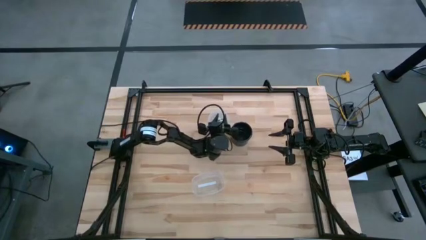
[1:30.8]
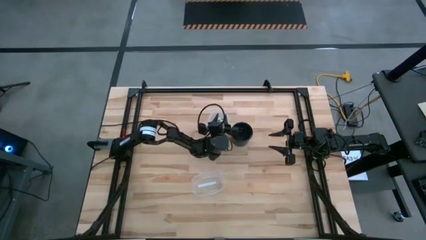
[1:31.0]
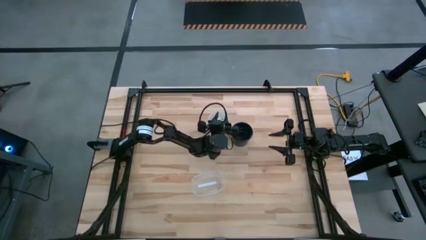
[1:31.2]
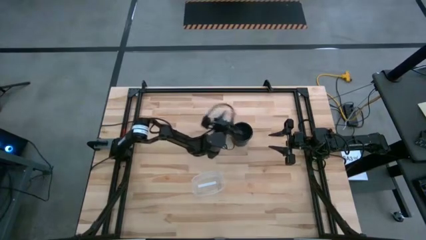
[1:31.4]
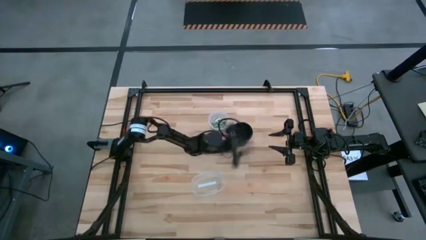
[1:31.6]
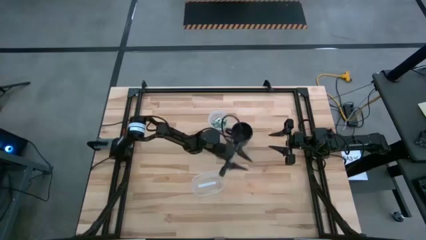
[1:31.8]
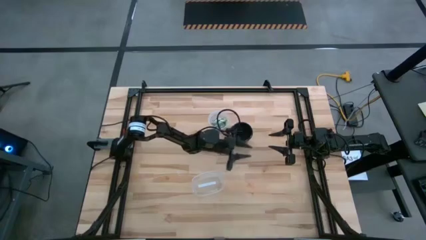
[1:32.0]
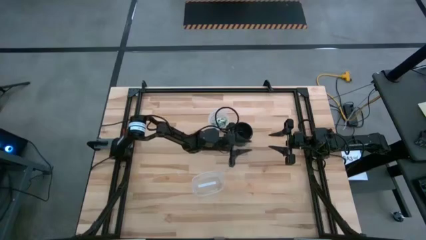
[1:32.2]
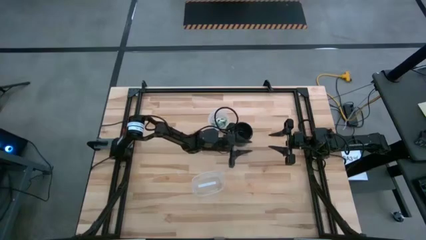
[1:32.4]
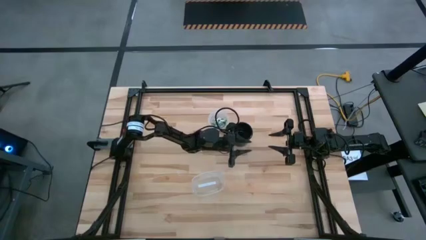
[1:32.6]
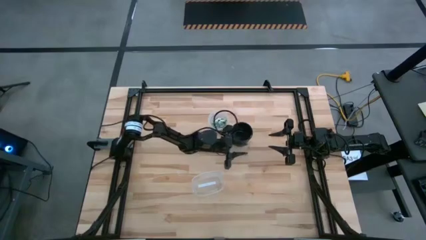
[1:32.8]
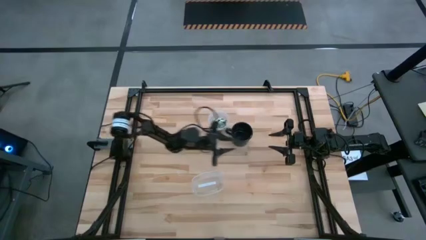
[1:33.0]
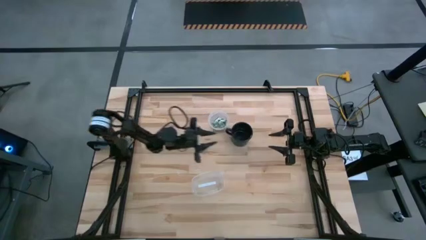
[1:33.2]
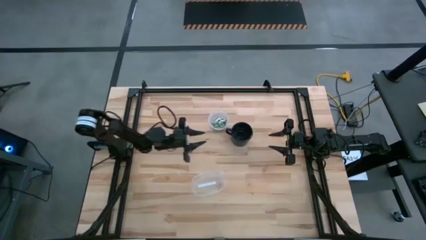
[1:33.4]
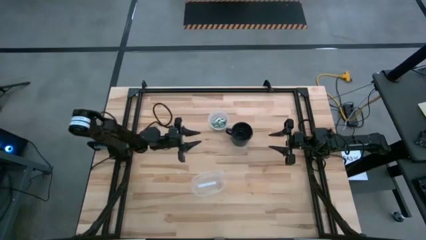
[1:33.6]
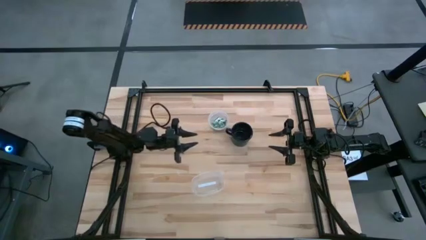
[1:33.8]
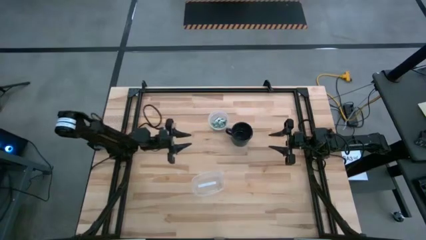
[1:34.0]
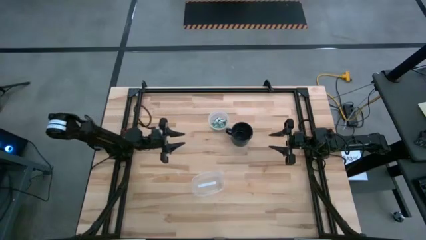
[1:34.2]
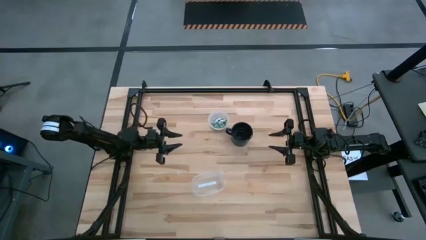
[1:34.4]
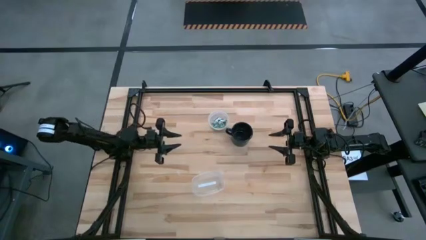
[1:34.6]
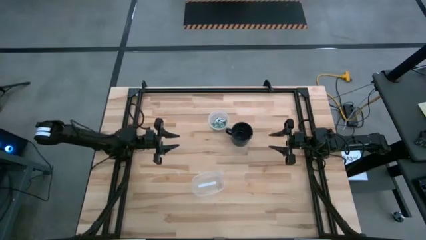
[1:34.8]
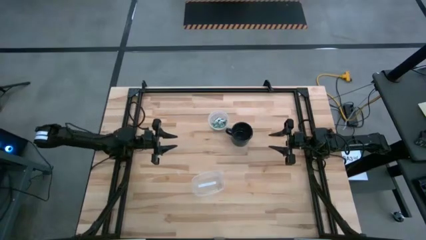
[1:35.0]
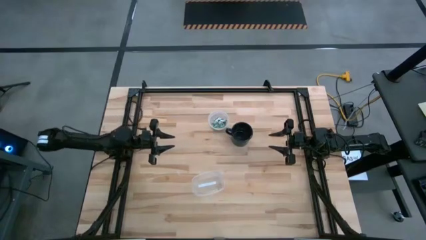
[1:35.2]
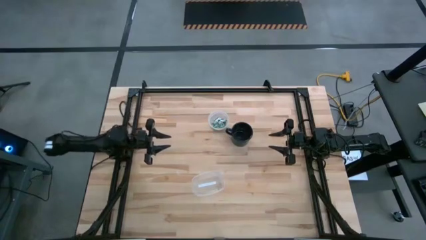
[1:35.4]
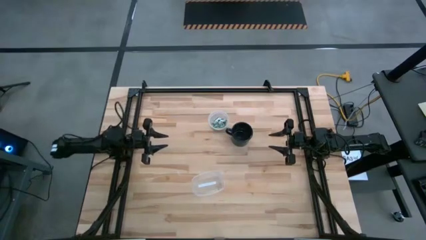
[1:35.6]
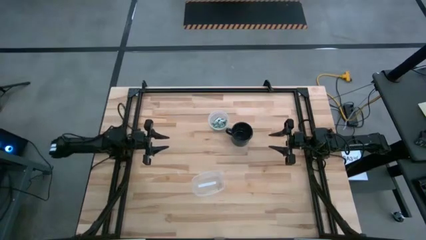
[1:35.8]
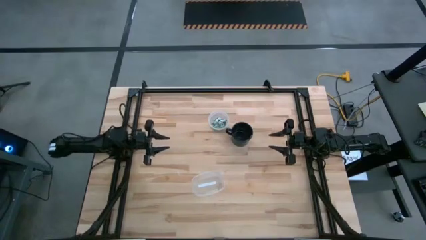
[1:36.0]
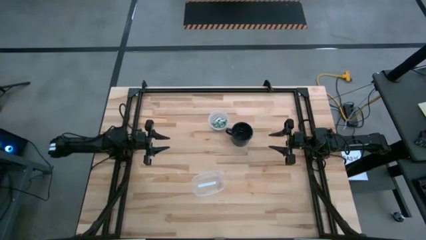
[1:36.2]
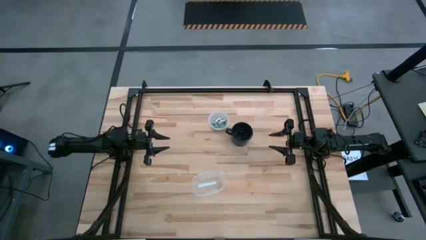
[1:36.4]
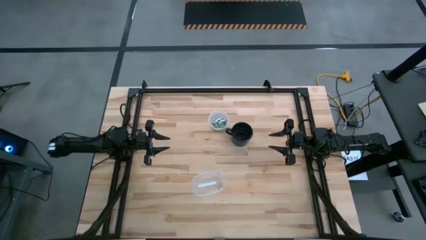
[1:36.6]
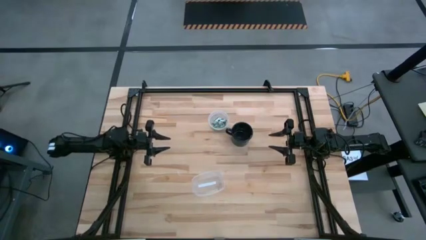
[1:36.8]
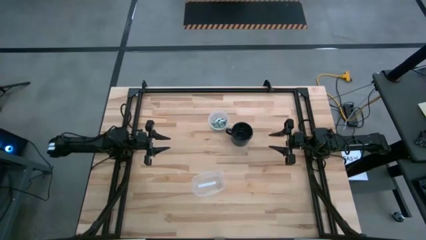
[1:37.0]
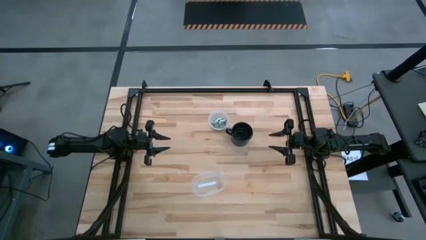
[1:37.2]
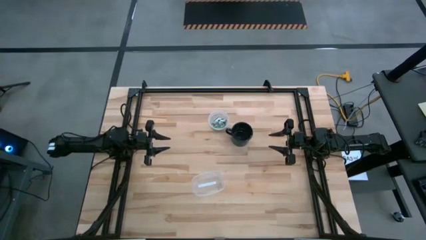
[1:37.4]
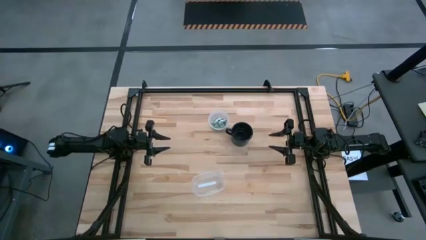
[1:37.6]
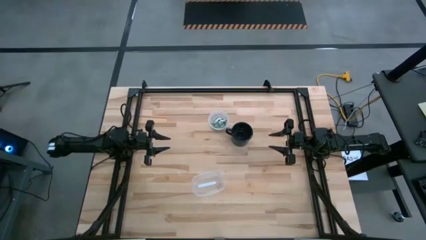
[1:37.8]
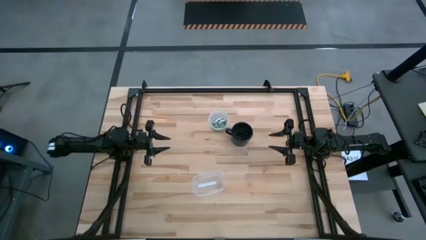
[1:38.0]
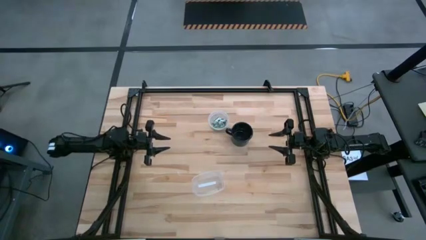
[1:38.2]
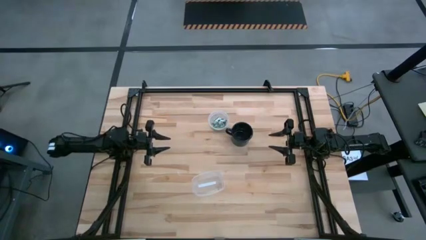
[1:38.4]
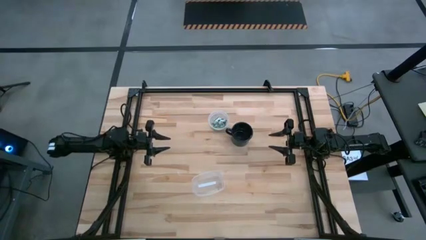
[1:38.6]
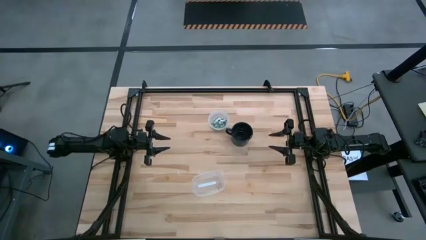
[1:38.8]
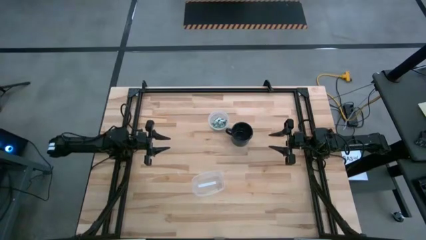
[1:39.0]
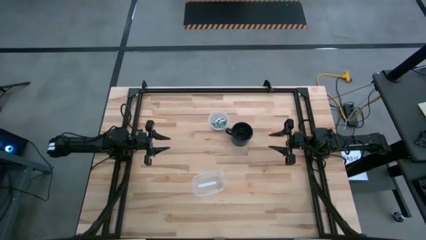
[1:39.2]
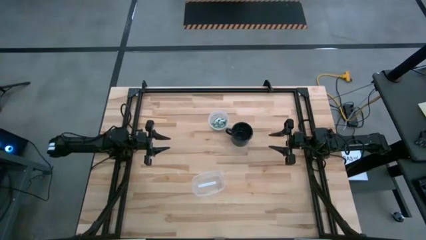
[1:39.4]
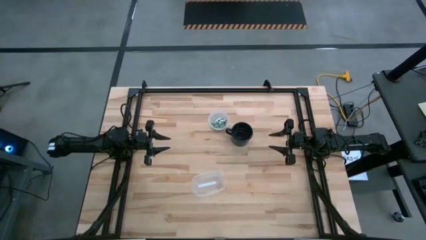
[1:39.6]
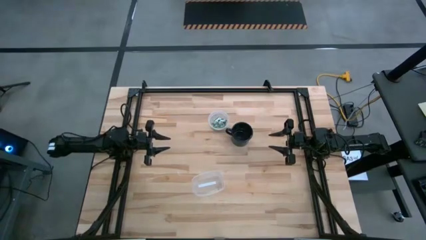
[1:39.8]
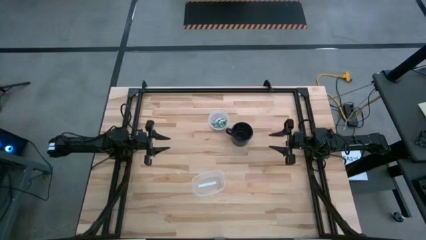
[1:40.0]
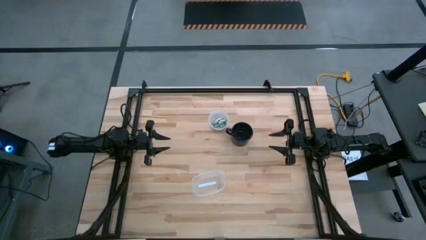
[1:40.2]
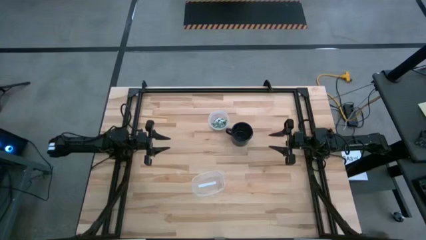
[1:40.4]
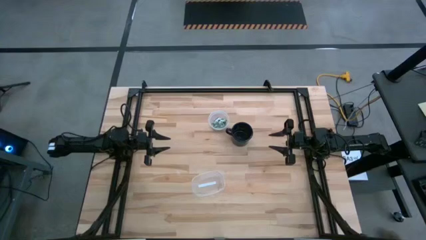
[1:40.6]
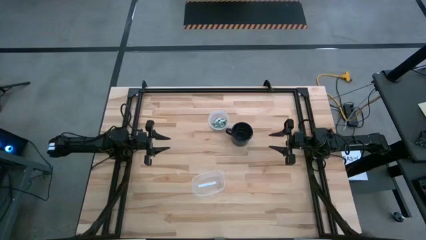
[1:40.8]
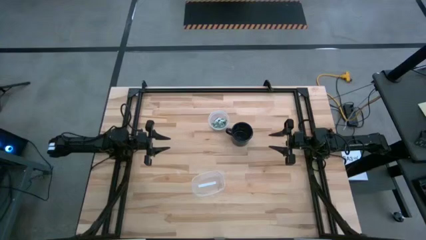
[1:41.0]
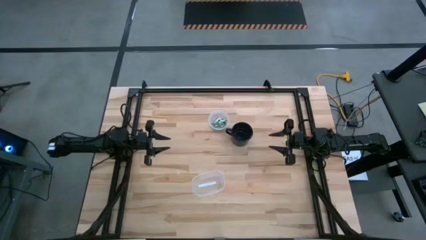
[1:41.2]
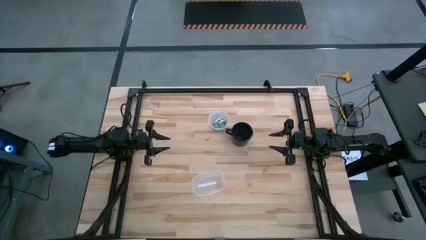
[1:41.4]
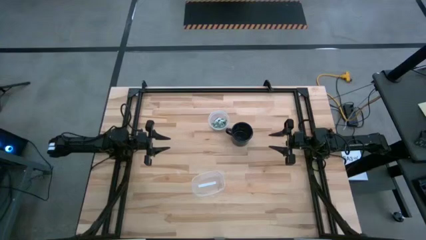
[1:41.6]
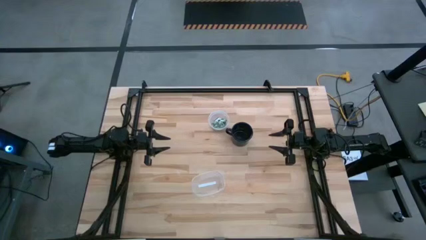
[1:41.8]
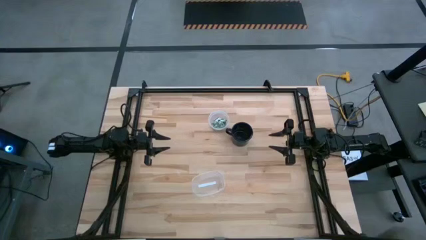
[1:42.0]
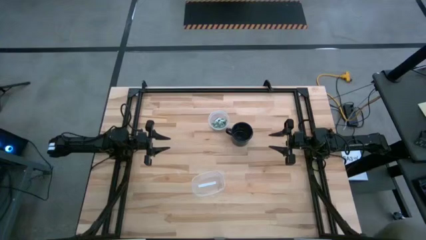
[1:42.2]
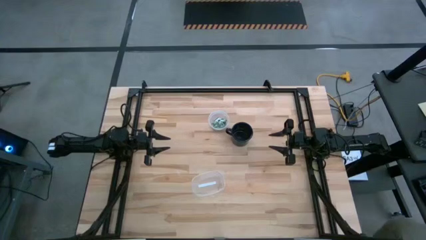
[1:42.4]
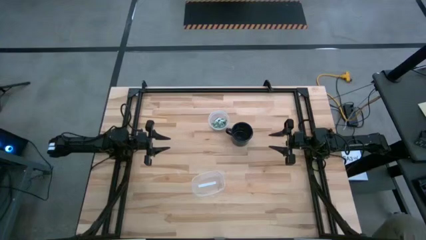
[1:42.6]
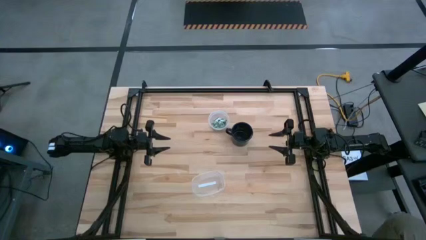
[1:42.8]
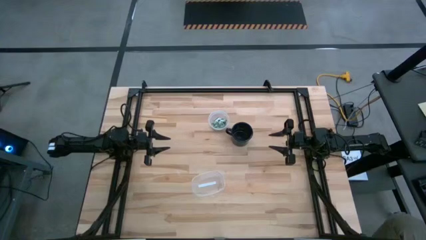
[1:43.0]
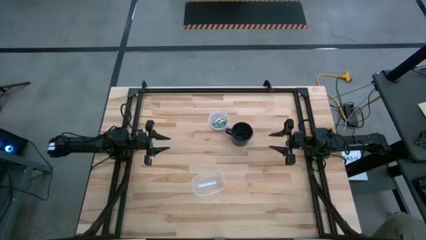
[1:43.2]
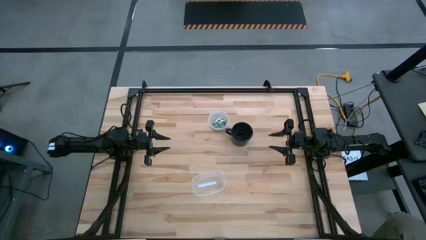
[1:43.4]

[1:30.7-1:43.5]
Task: Pick and place Stevia / Truvia into bins
Return to Home Position

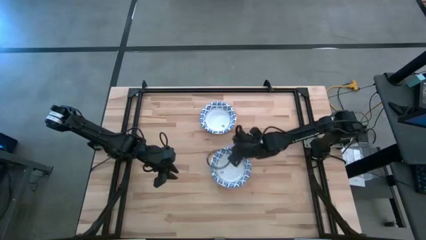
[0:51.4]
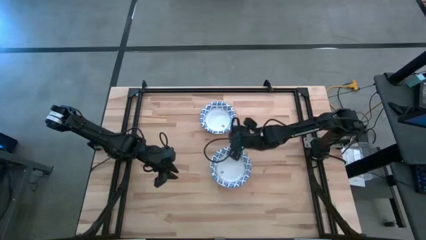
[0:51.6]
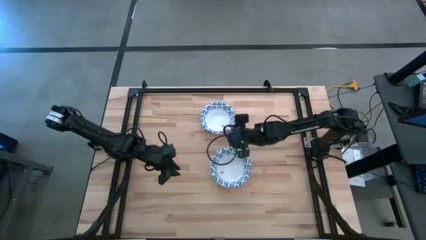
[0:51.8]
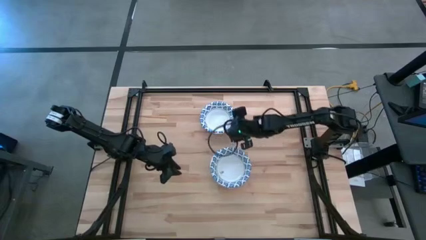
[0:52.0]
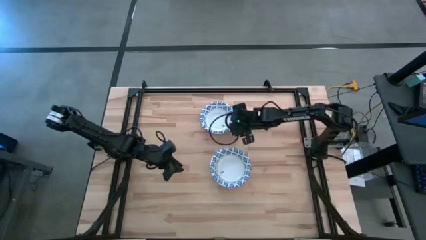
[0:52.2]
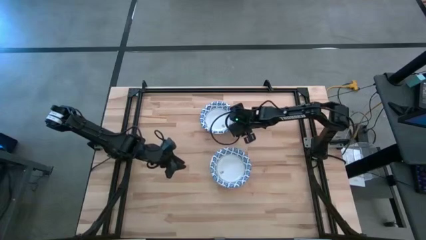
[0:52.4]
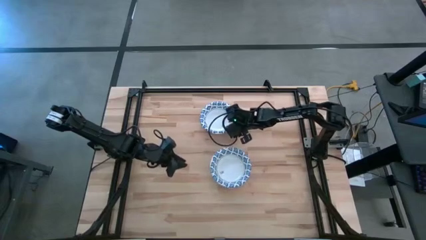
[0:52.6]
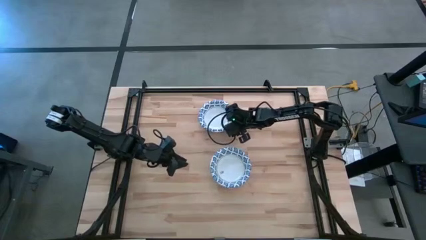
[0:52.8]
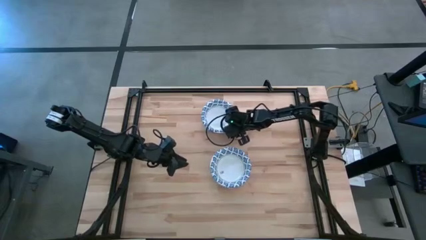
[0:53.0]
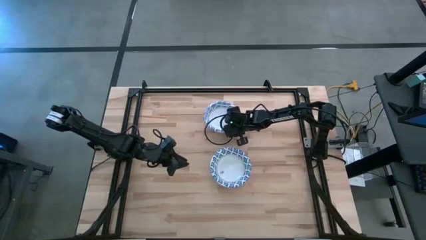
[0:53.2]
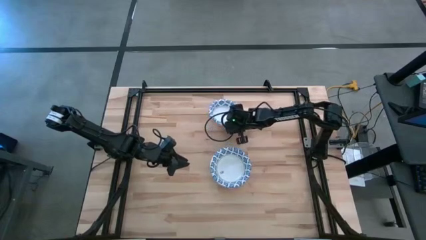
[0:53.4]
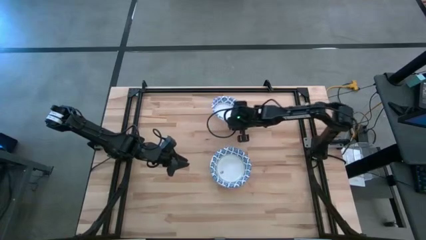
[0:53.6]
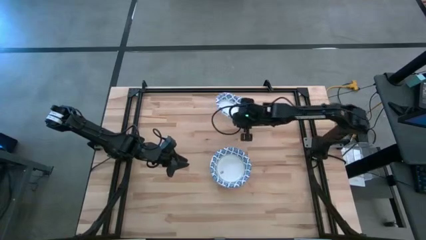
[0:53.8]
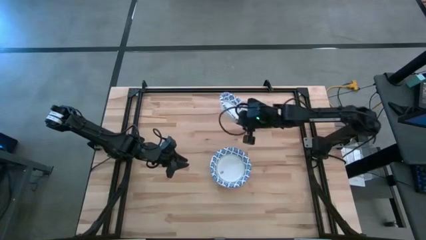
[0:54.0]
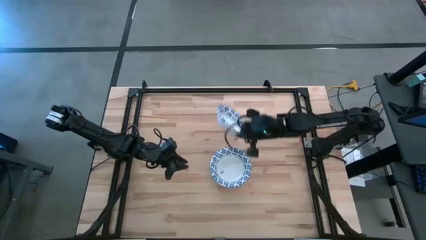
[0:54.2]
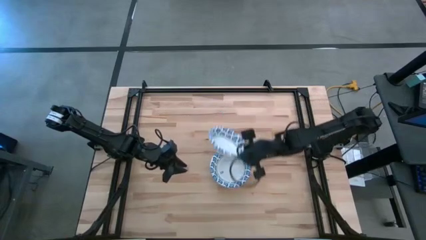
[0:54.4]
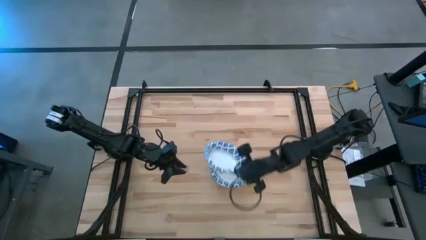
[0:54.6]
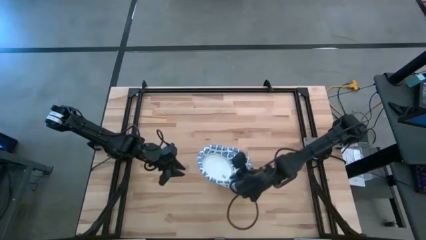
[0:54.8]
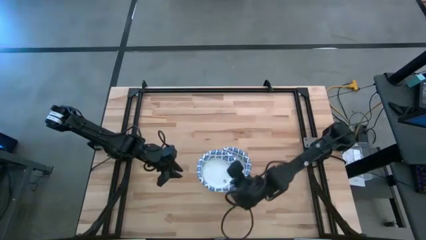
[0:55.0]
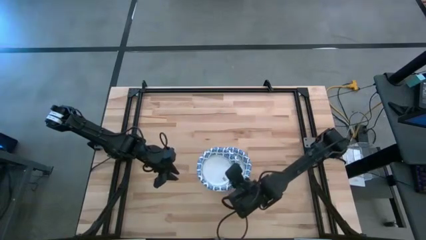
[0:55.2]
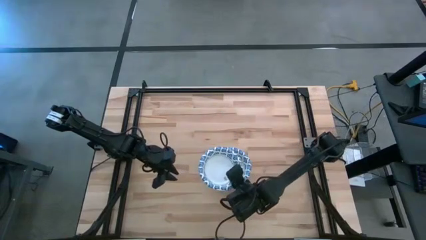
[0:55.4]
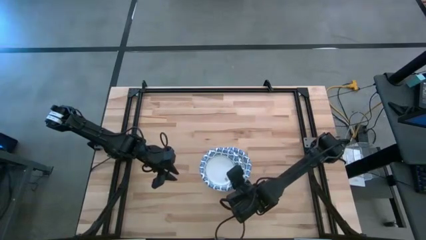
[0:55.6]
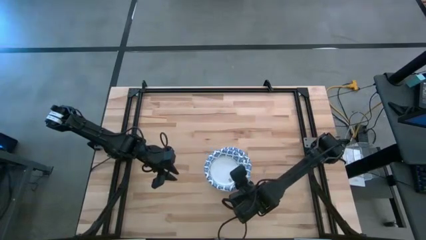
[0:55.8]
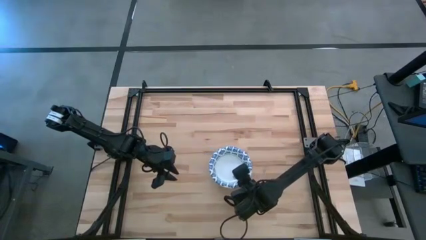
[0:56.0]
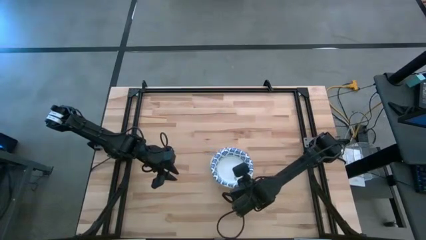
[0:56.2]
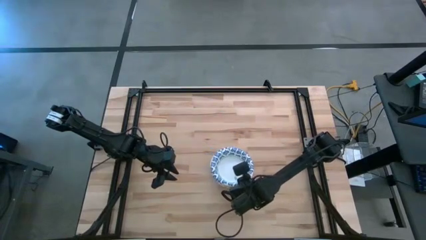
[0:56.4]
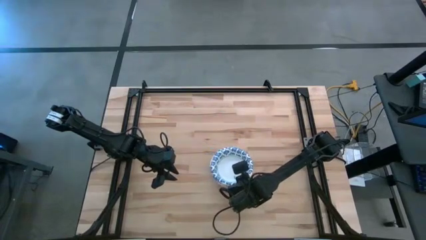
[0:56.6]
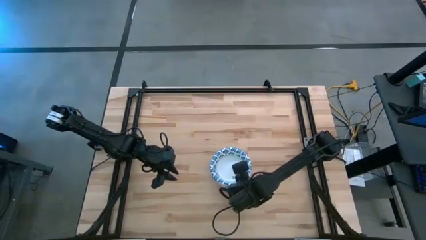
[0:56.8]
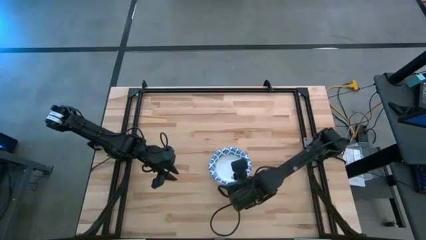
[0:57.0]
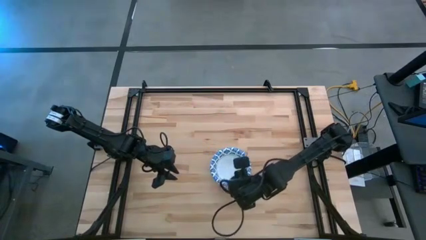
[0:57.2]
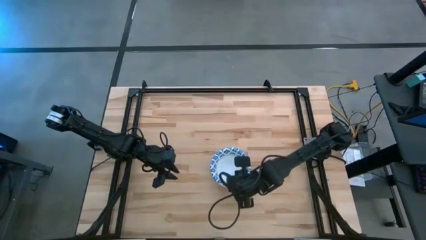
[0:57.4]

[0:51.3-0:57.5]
Task: Nest bowls inside each other
Stack the white patterned bowl on top of the other white patterned bowl
